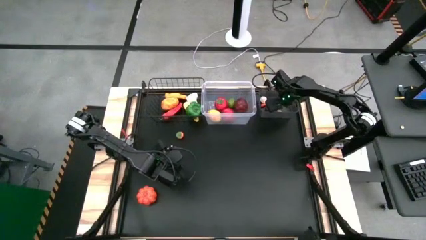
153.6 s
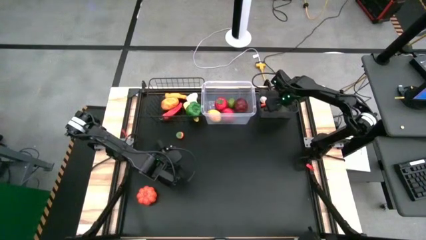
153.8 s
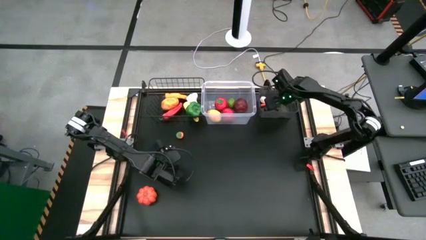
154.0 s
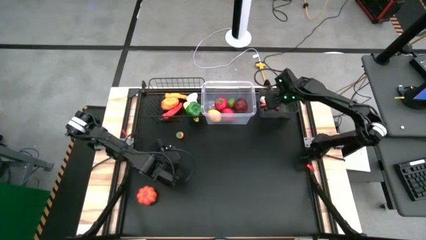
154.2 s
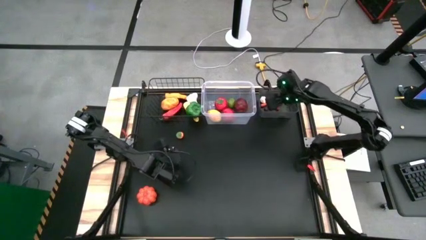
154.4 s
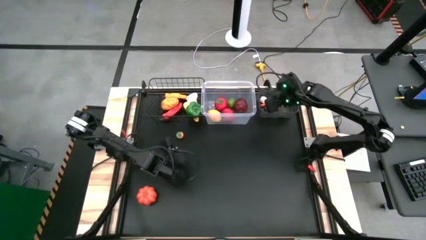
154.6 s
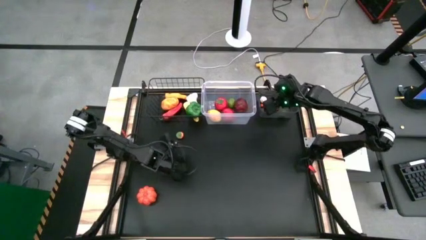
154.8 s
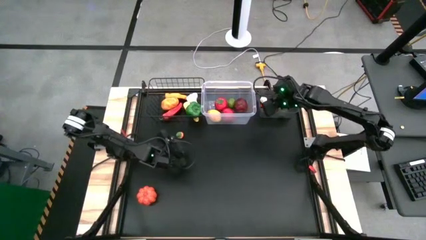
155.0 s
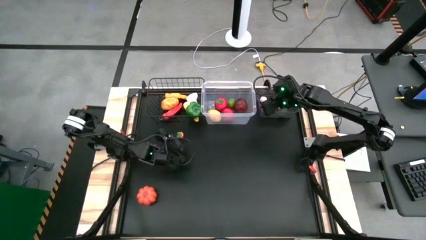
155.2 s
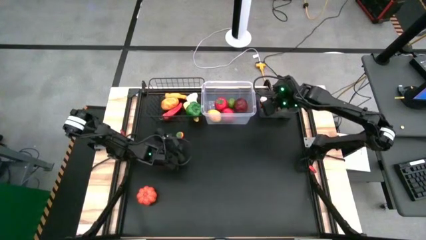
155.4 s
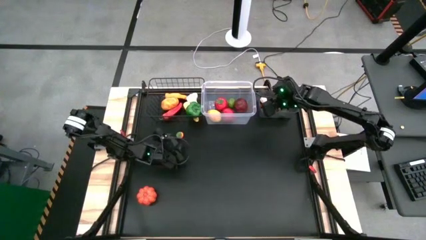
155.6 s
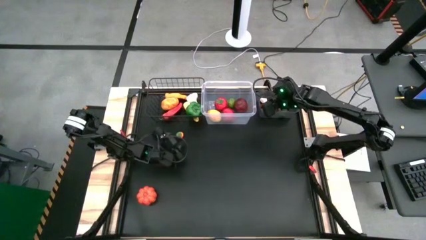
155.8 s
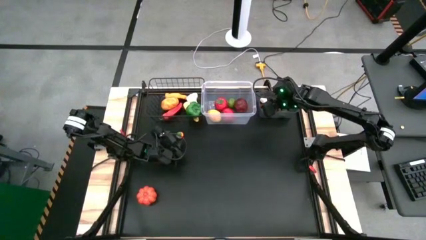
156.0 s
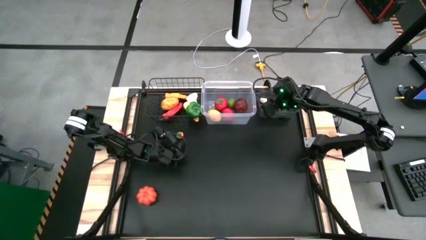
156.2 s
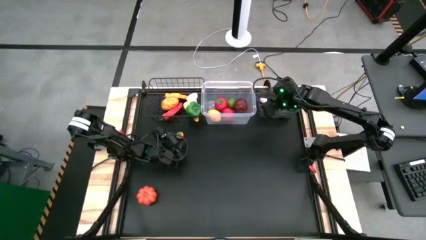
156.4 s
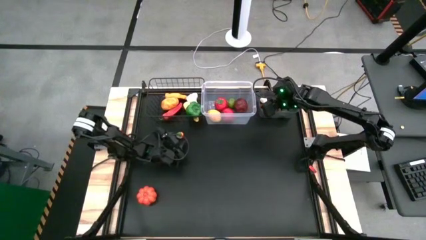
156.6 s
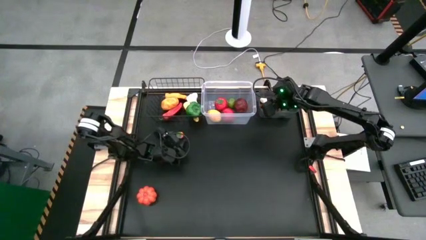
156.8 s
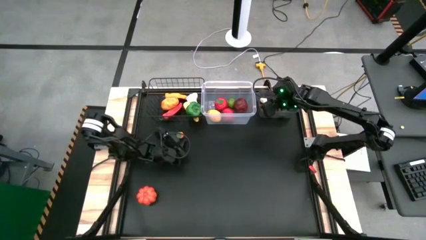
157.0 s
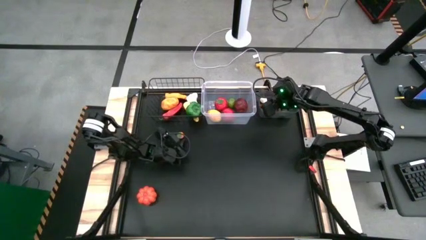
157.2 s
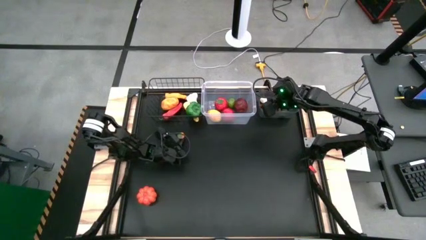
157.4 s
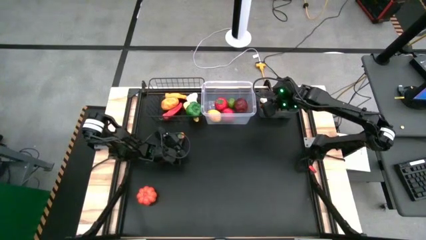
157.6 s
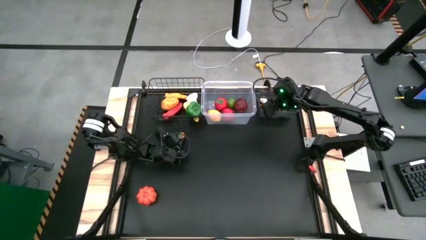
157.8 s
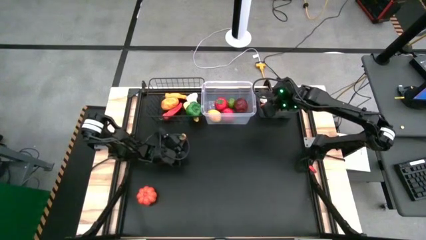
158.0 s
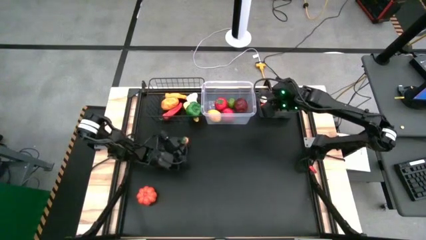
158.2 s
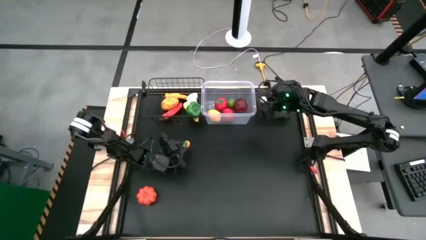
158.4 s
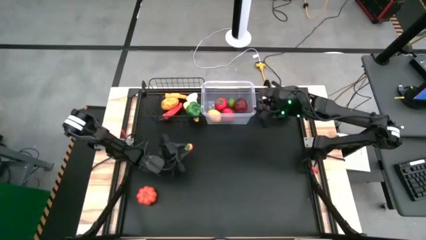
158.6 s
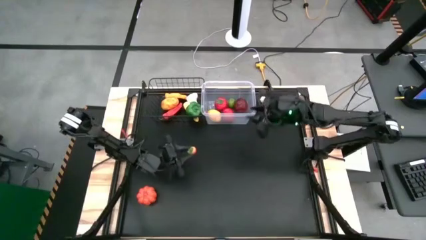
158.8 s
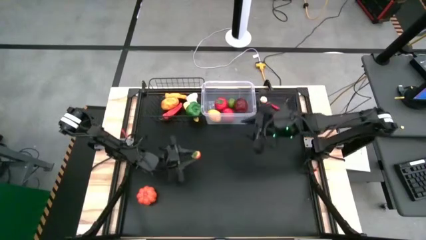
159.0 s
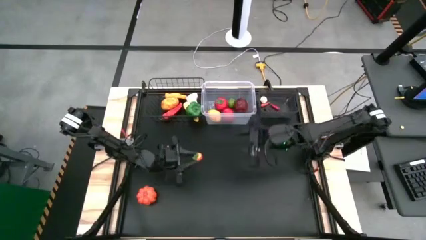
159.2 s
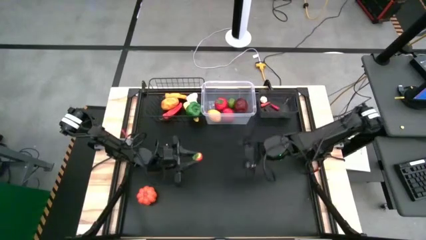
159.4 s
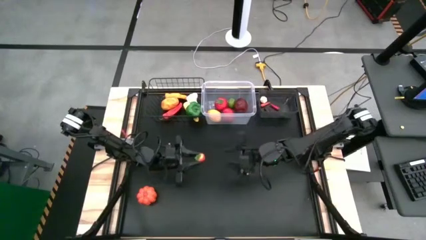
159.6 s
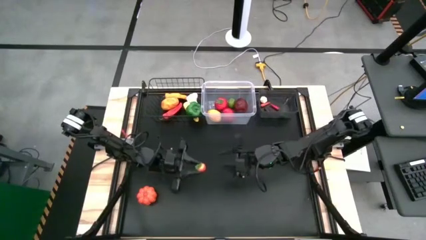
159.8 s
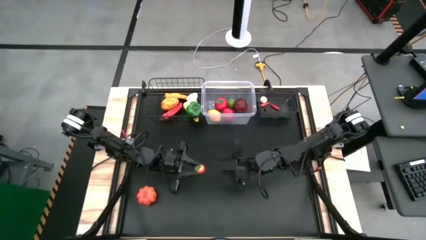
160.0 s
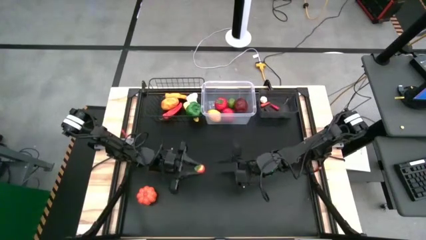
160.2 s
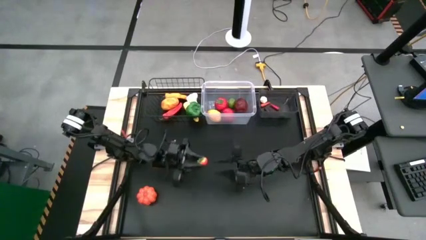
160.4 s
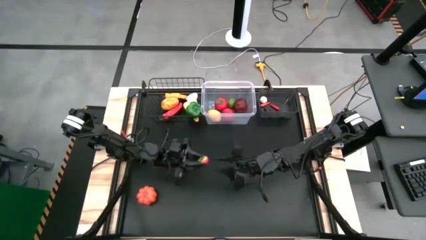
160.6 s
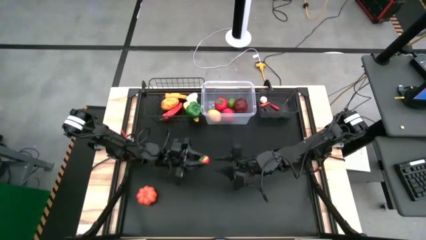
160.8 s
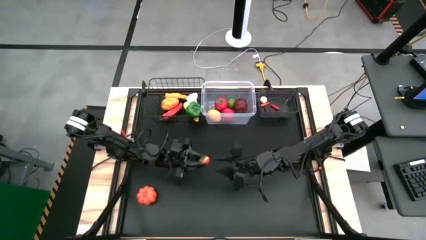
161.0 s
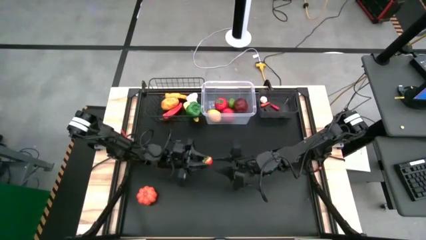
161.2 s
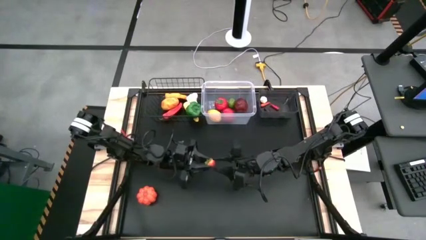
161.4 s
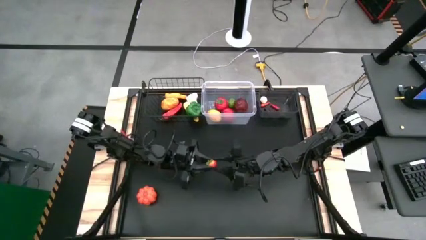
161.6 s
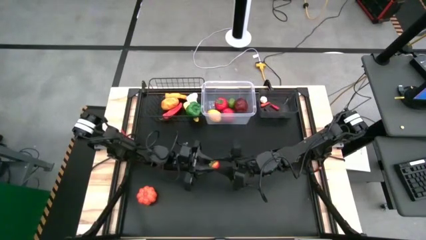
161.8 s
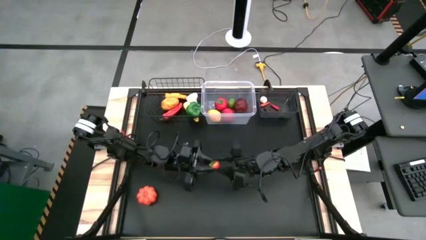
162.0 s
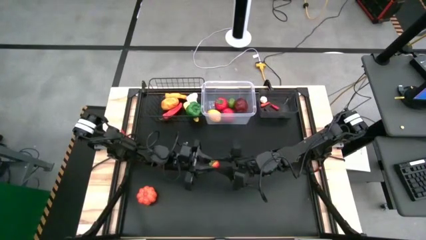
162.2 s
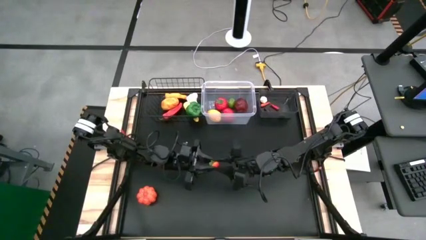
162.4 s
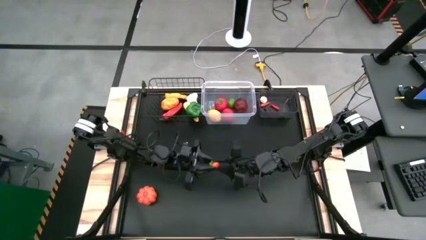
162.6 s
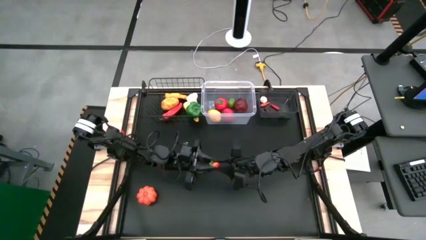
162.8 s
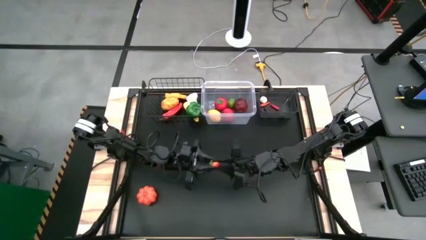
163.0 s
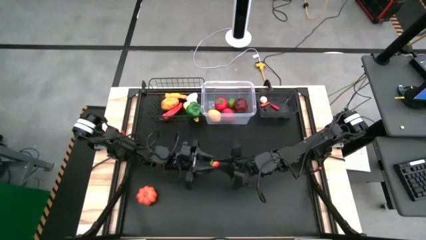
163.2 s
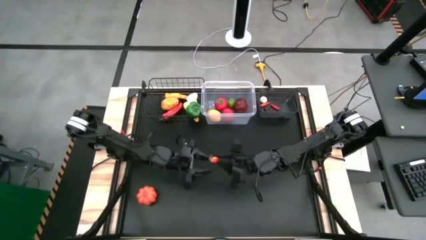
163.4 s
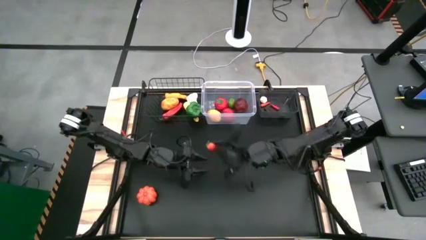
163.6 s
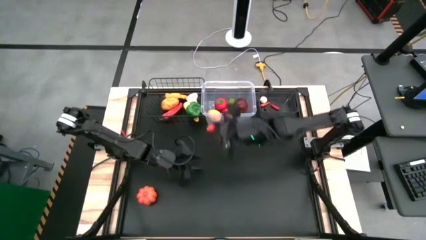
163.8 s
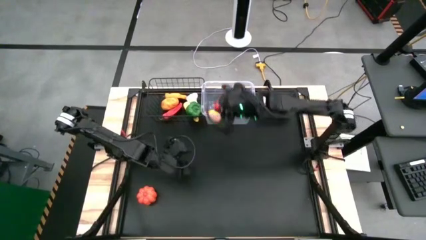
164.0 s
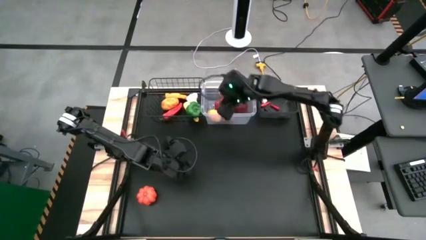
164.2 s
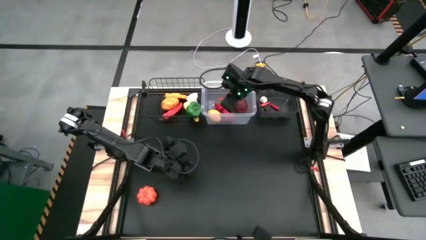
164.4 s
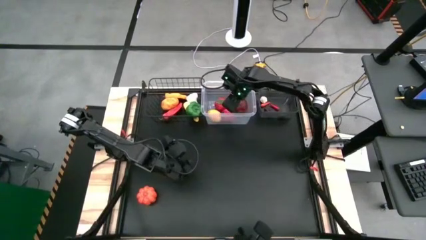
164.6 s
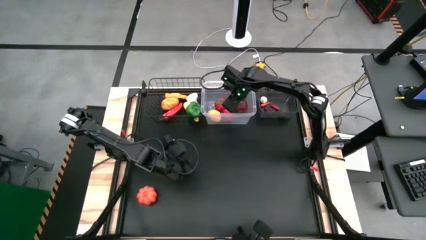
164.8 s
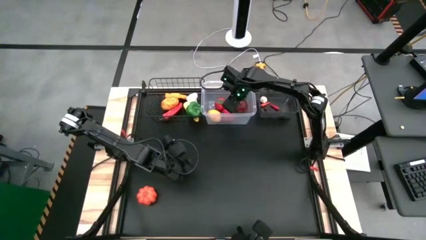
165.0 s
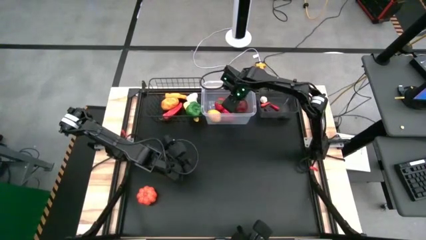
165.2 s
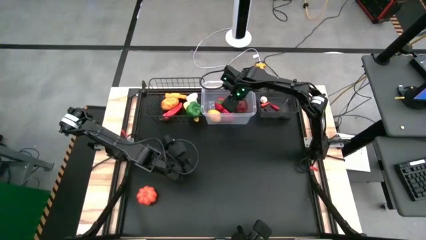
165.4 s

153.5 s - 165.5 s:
Task: Sort produce into baskets
Put the orange tomato into the transparent bin

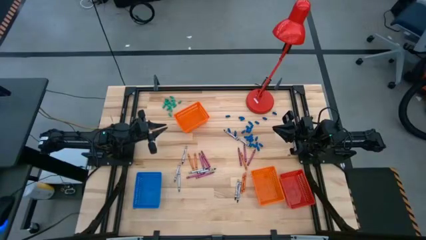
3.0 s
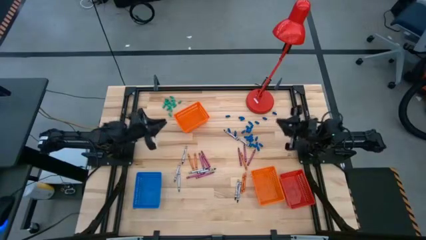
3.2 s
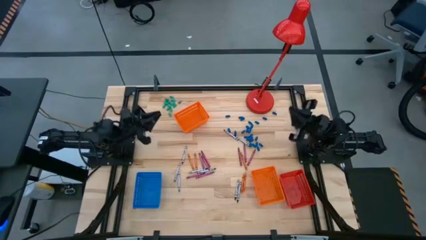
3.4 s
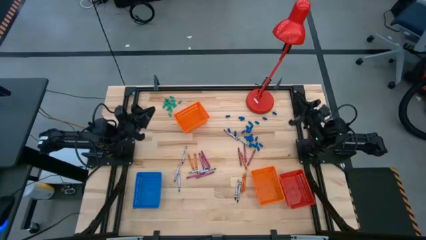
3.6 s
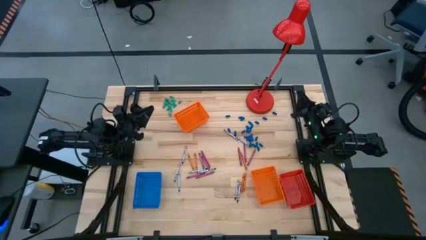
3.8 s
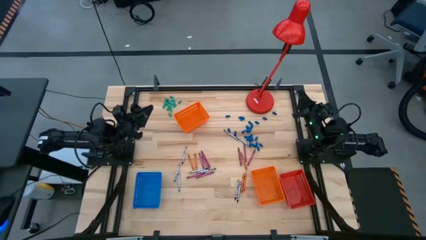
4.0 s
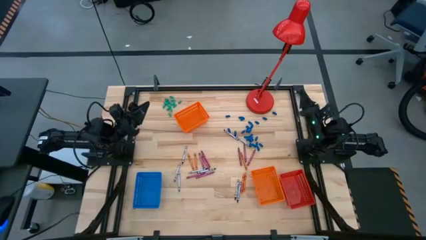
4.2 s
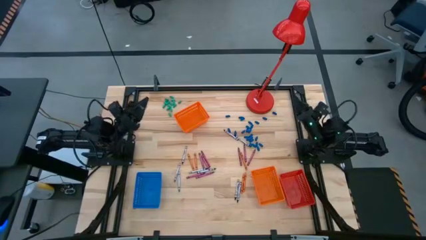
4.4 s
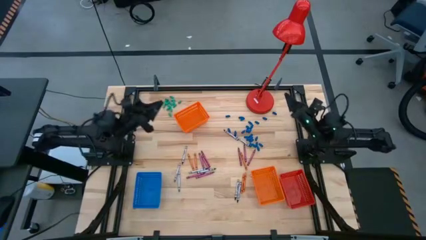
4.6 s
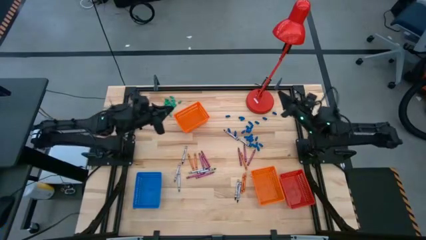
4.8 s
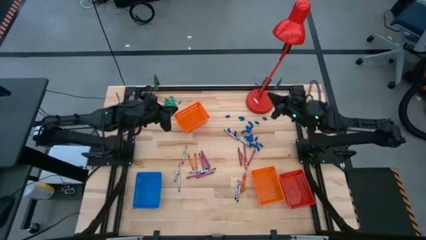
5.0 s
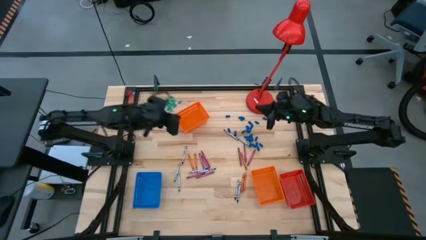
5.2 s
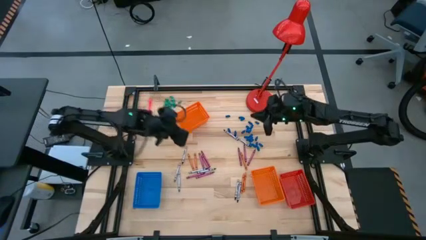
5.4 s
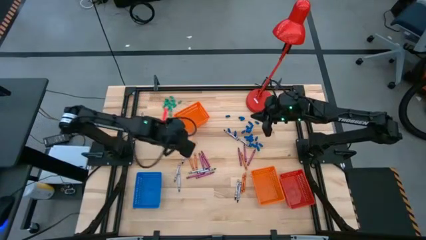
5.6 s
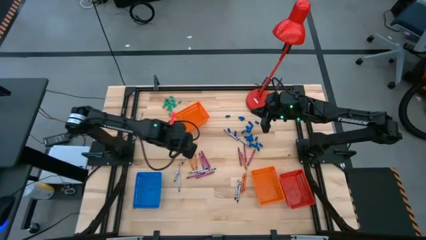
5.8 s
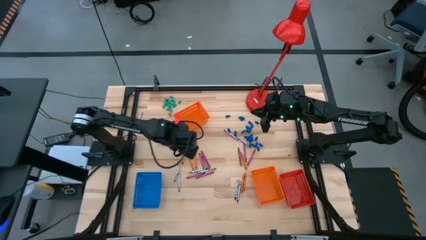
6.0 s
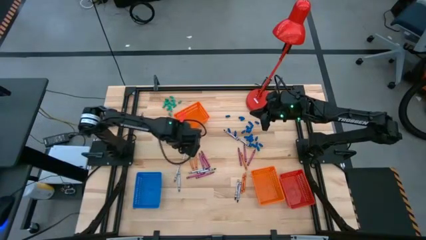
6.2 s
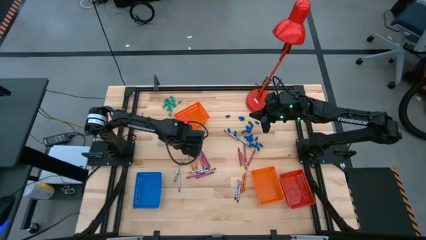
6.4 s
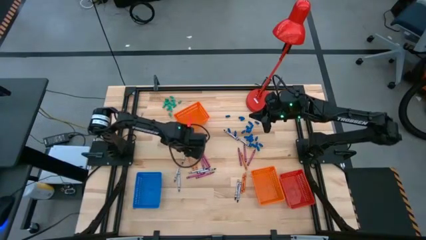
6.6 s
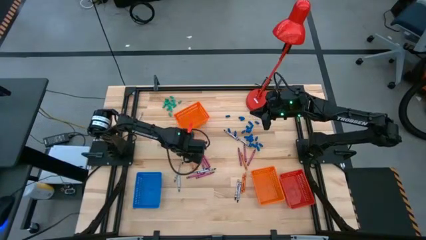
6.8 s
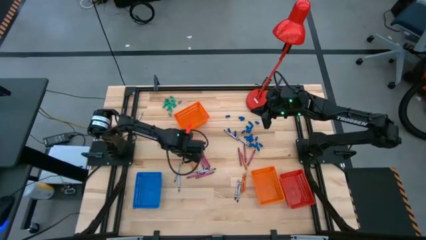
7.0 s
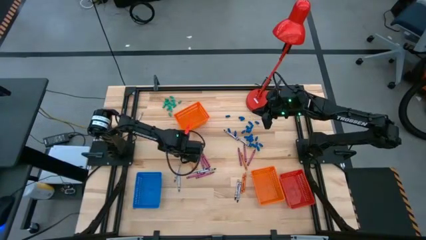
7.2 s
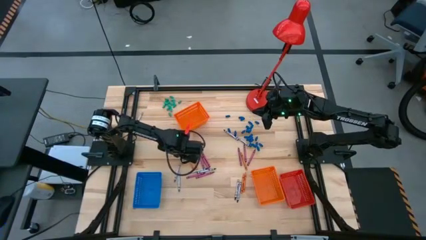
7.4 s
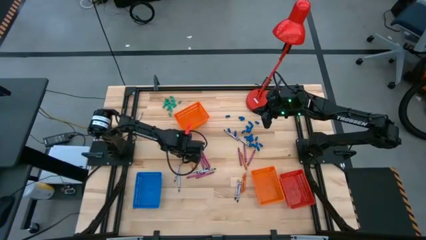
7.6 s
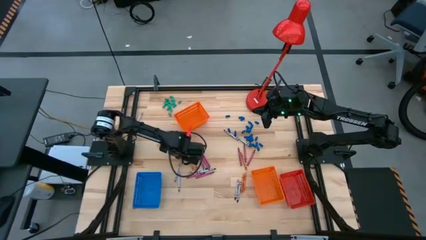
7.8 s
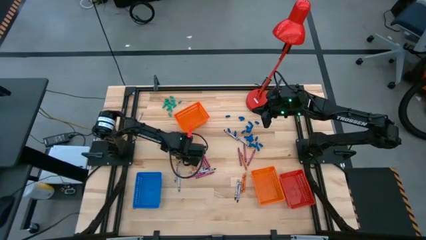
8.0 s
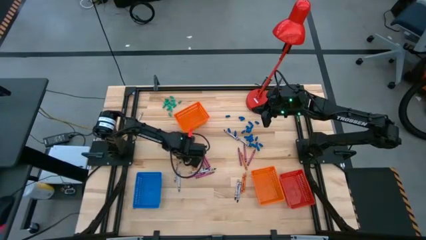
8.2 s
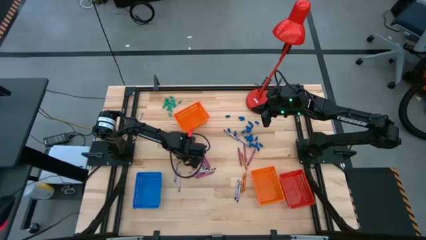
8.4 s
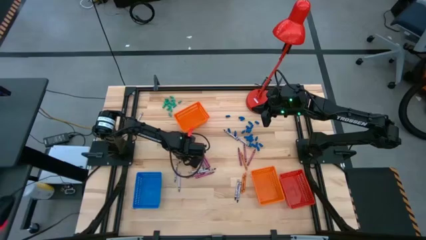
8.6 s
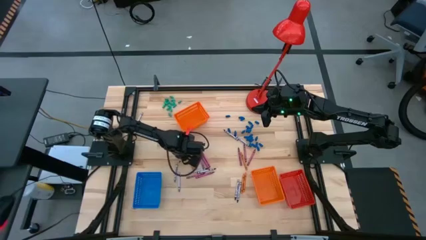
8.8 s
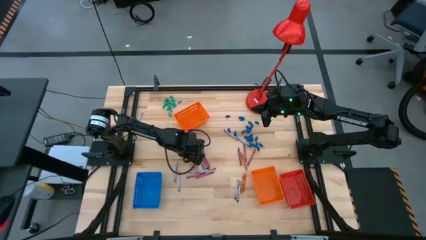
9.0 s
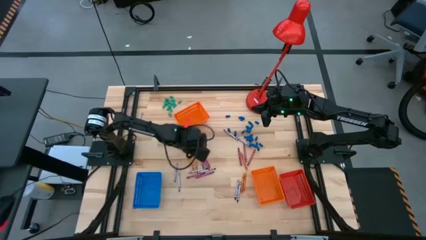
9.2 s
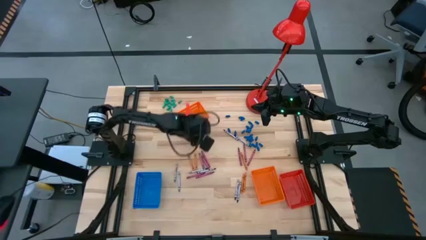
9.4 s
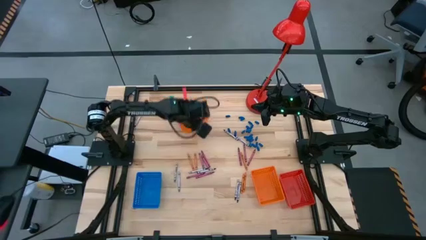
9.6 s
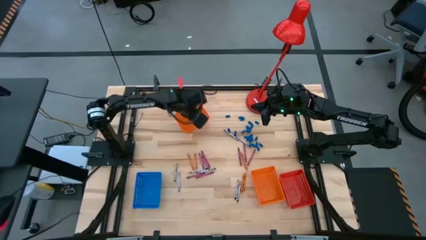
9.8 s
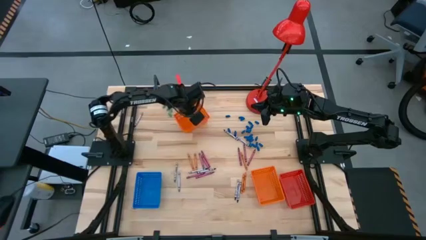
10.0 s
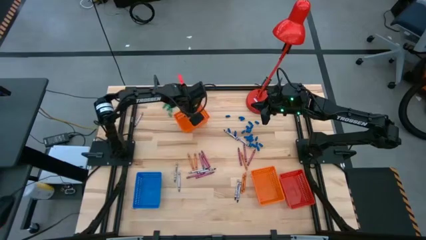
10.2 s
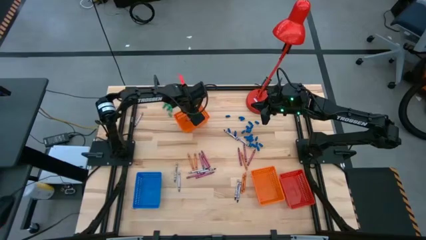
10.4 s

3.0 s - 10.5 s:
Task: Sort crayons
Put the black crayon into the top orange bin
